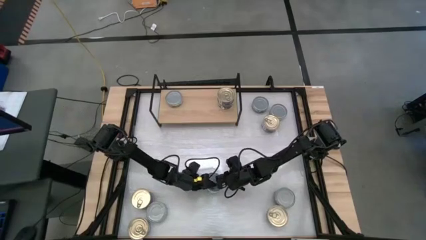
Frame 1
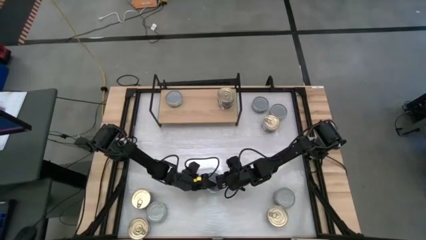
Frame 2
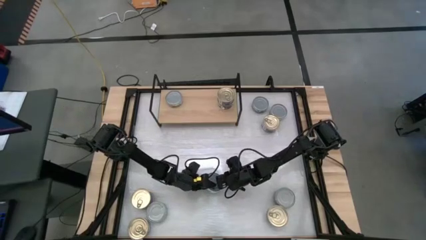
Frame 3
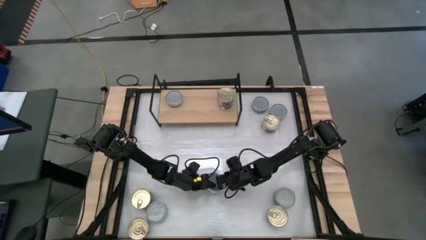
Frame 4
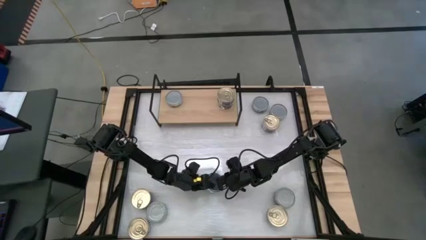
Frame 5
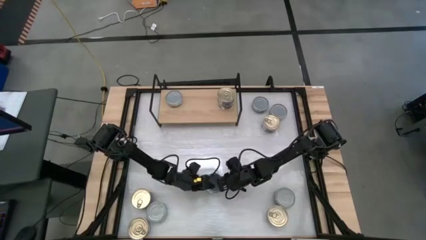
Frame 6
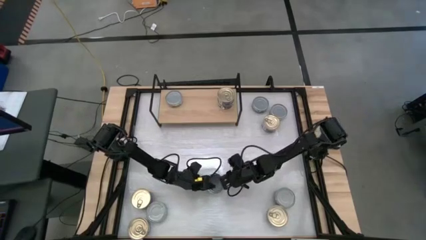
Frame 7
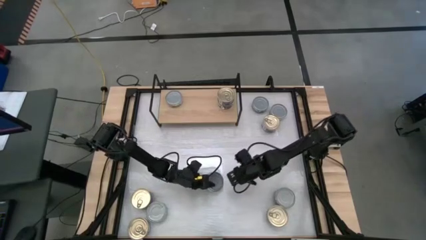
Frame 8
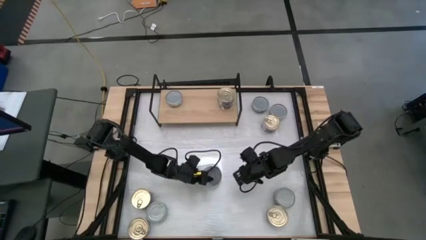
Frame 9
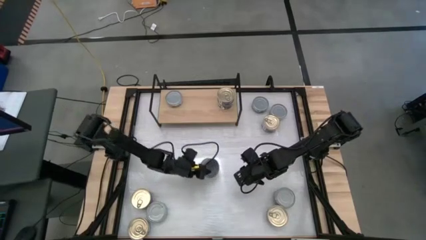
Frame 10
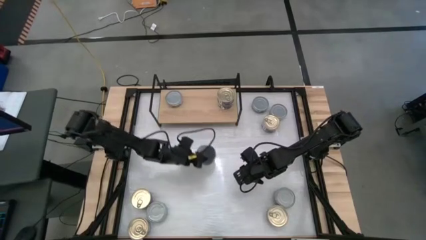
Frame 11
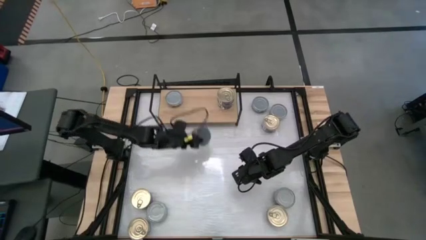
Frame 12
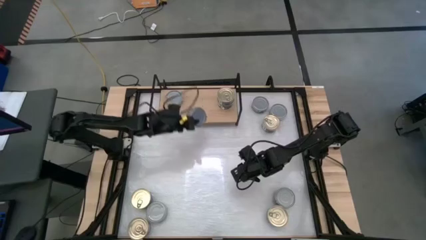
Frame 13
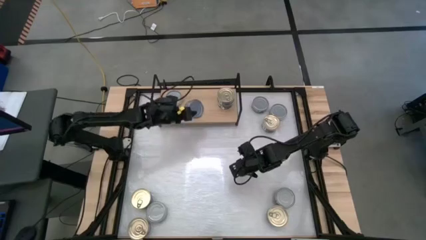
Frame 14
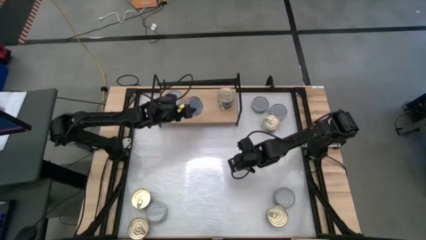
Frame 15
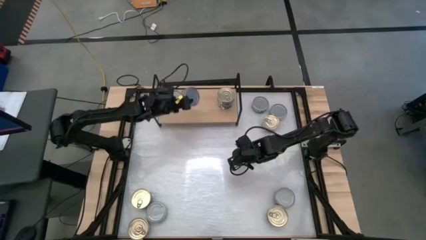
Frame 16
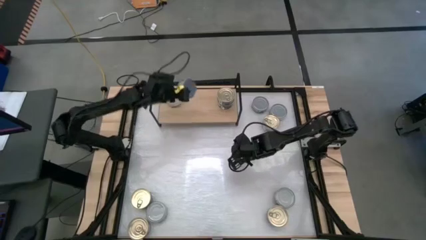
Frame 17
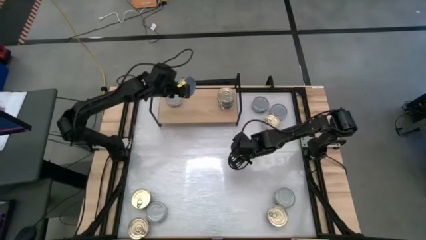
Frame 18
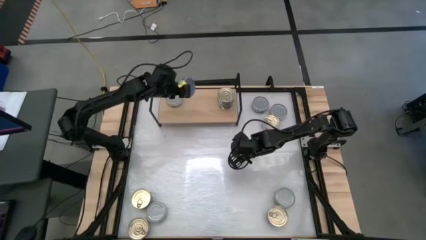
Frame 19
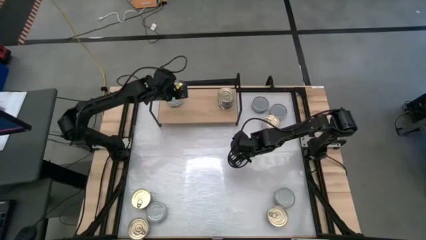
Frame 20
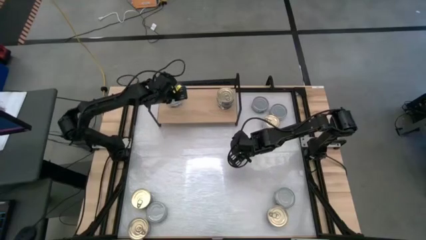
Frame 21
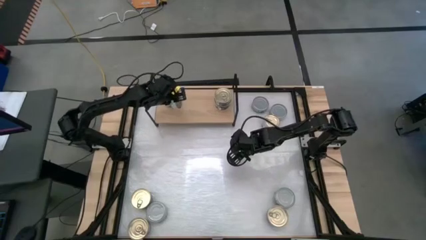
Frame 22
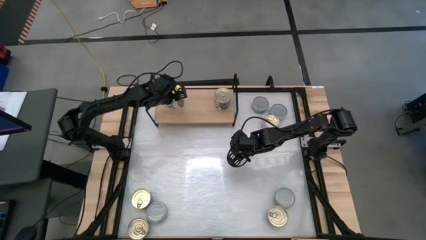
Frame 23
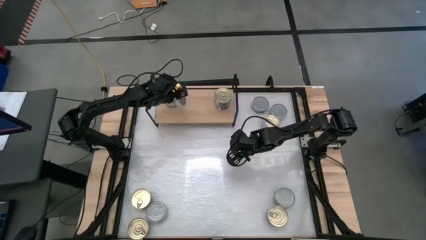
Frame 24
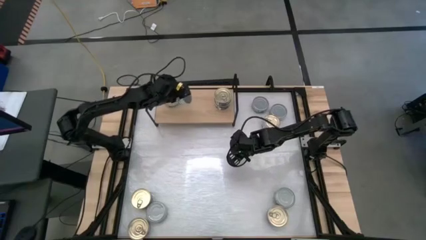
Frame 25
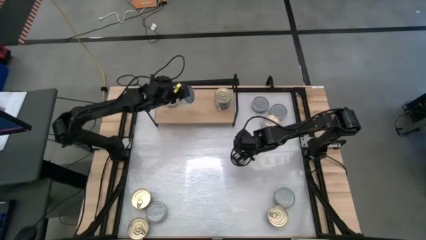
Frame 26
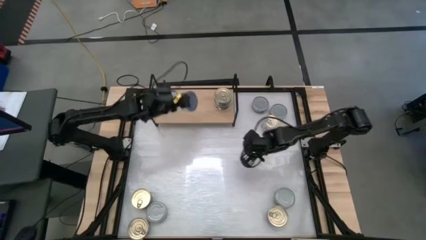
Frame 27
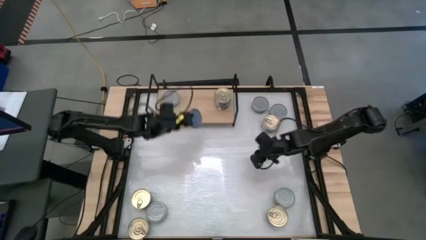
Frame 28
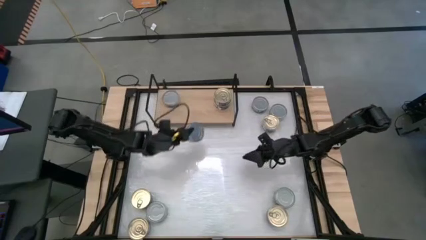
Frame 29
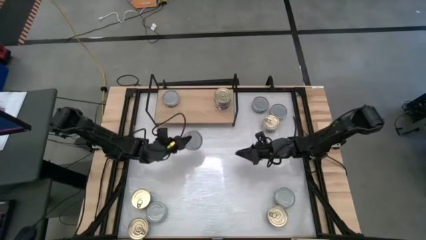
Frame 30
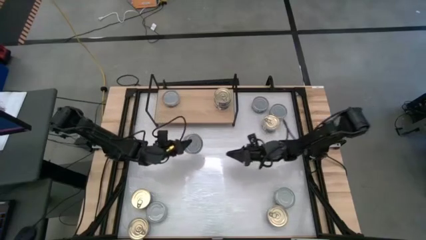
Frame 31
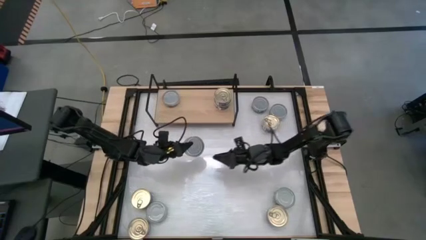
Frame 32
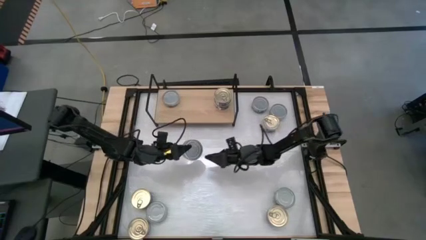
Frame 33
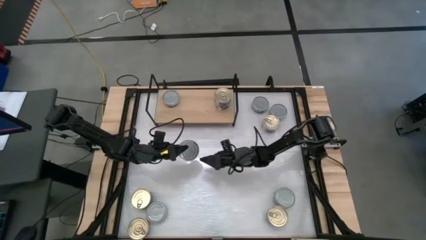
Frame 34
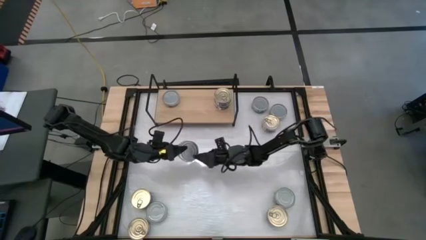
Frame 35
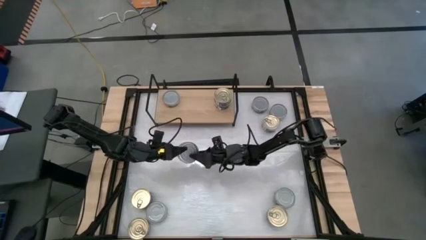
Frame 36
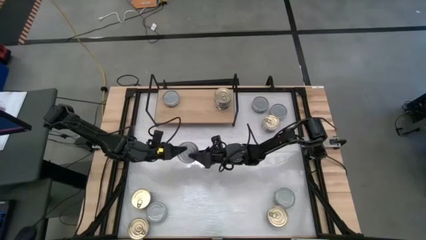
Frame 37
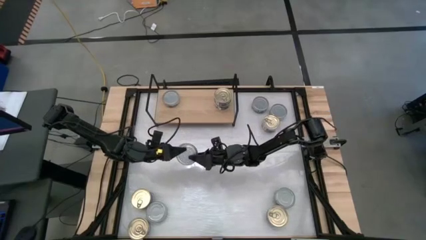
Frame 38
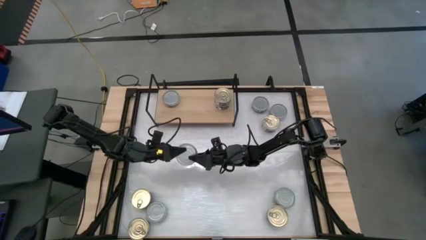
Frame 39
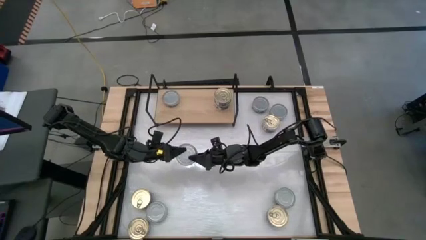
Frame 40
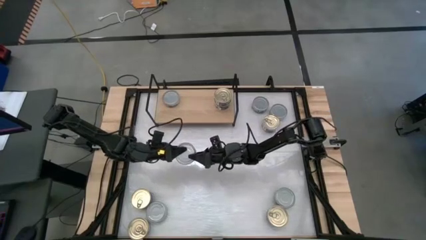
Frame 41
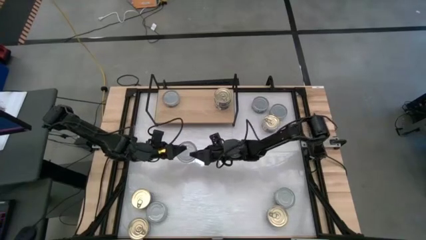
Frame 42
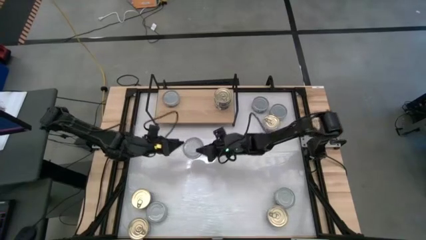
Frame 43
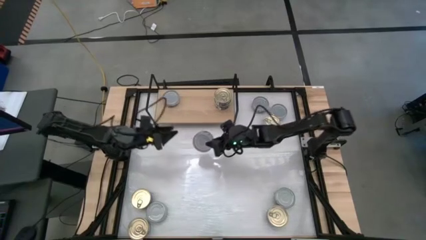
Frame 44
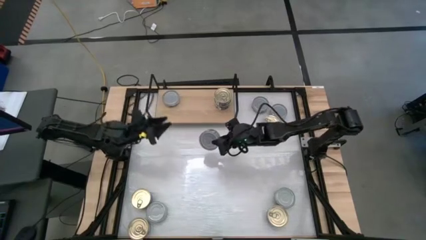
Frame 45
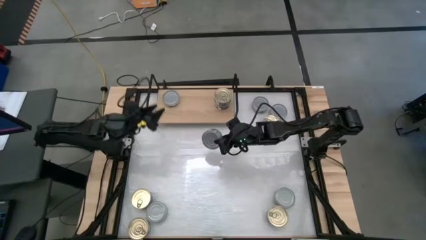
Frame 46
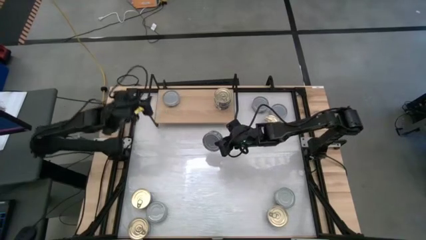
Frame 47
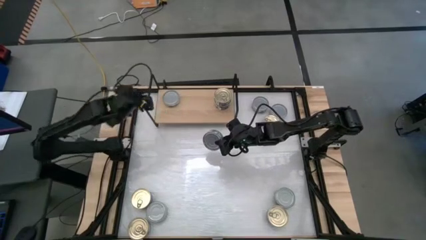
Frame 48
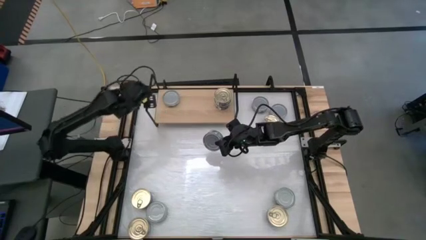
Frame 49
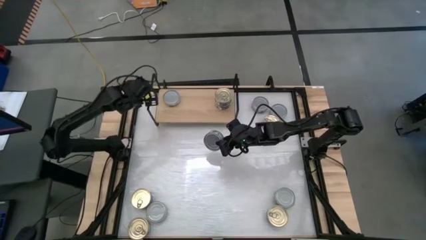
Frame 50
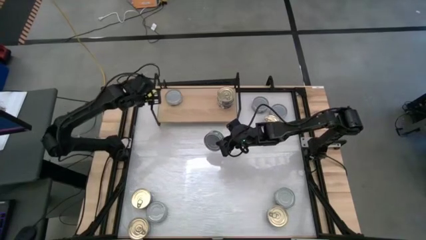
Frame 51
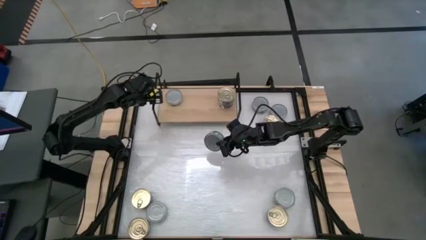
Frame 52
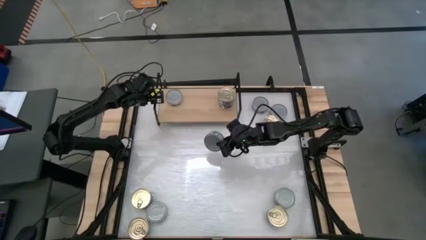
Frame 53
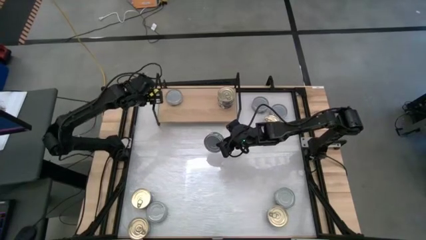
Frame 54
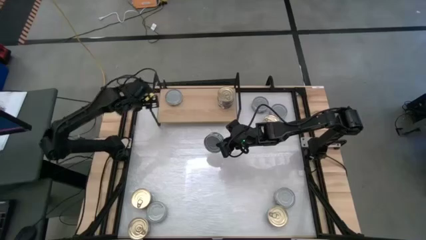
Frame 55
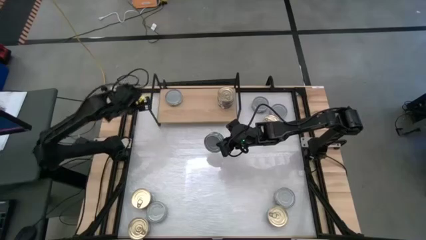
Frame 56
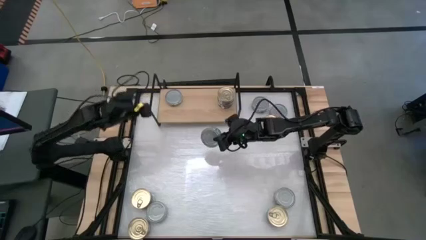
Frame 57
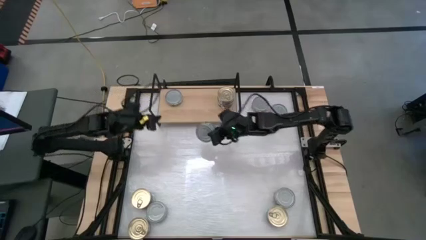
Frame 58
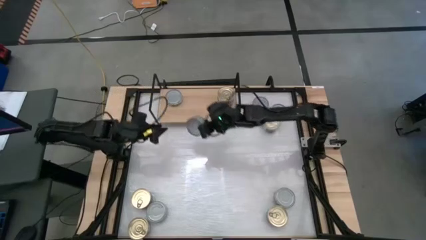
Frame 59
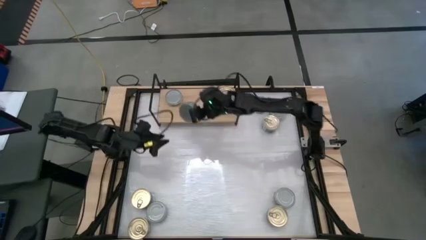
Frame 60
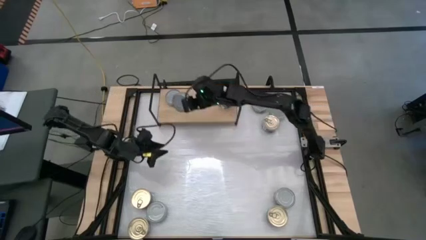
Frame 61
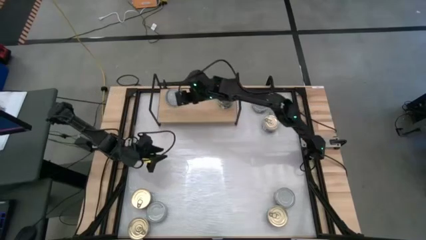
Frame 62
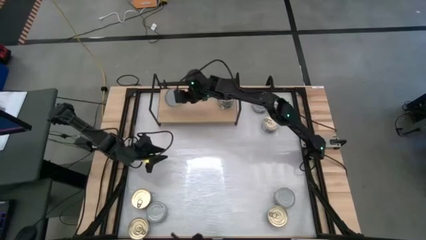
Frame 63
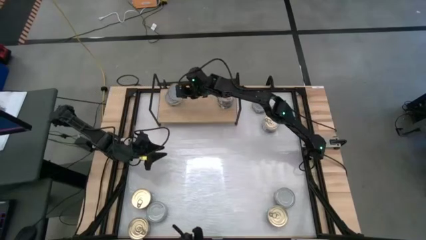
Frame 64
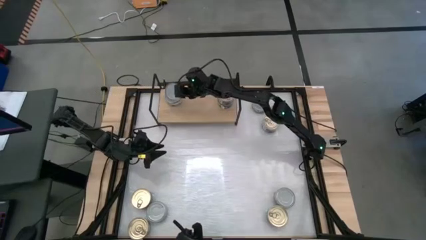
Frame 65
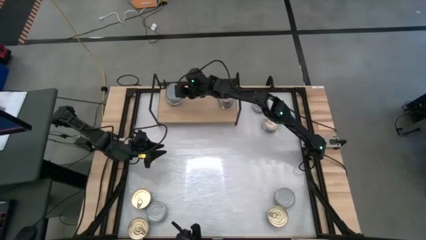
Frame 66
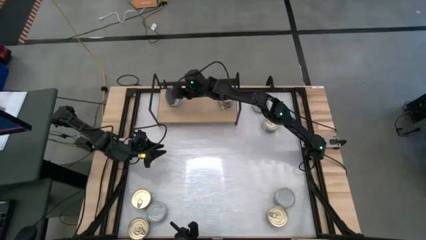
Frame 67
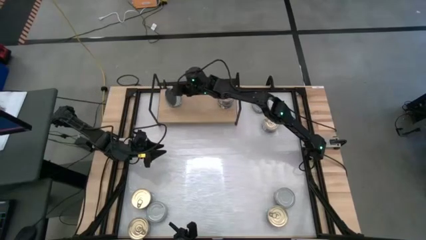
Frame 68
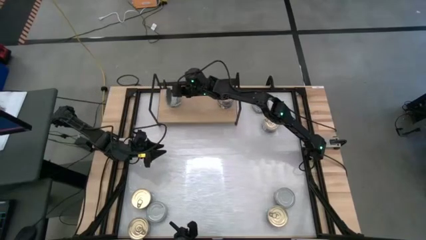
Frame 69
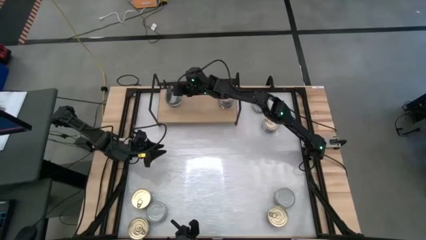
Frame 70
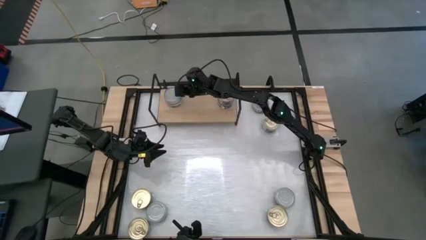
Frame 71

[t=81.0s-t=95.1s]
Task: Stack canned seafood by type on shelf
Stack the green tuna can on top of the green tuna can on the shelf

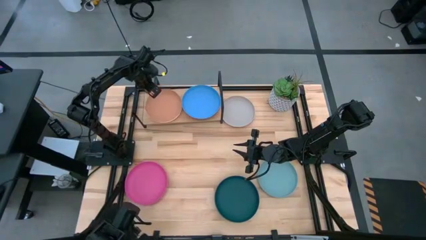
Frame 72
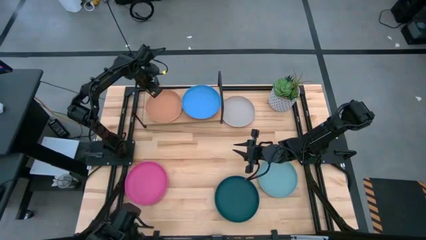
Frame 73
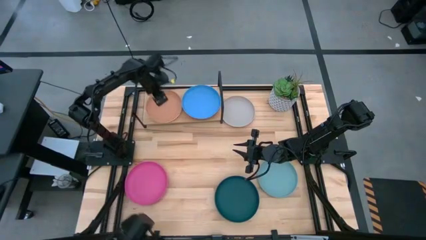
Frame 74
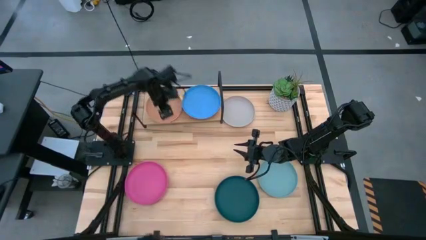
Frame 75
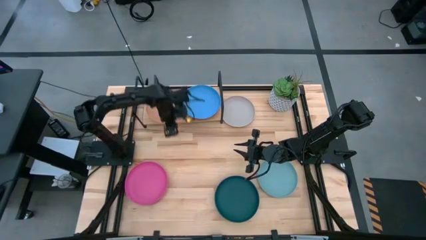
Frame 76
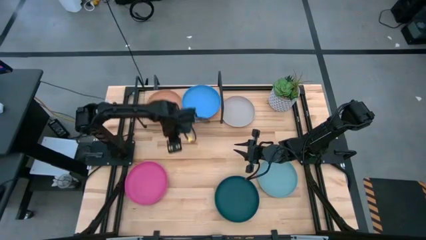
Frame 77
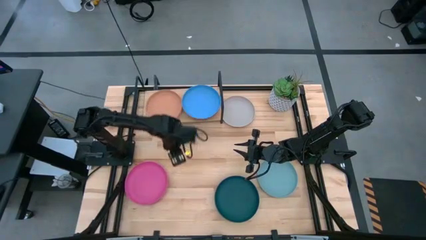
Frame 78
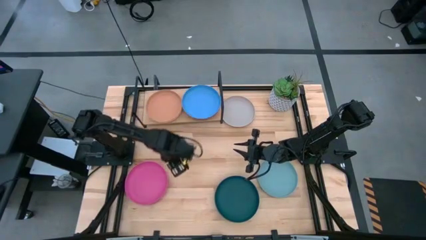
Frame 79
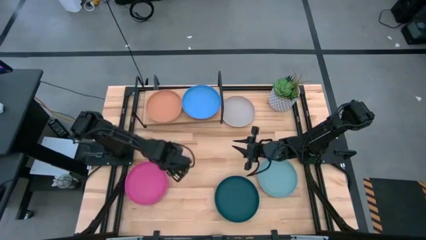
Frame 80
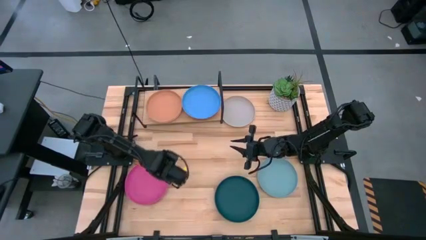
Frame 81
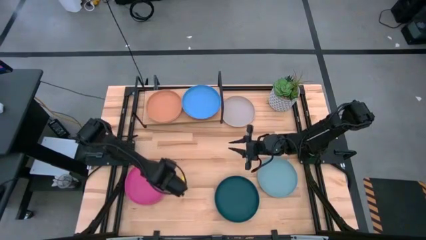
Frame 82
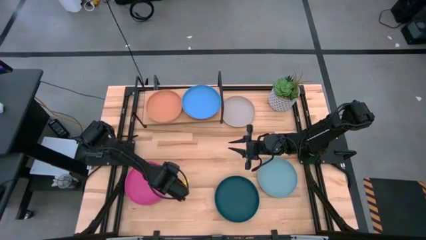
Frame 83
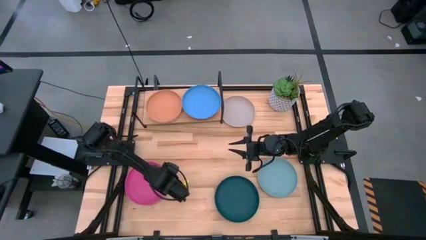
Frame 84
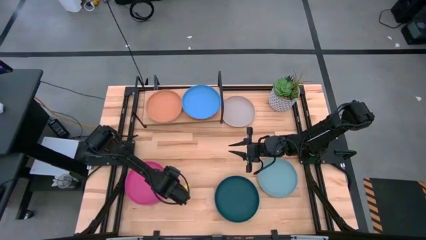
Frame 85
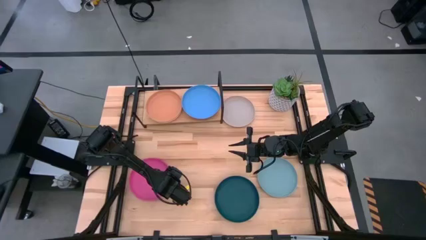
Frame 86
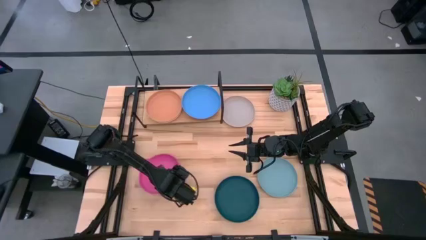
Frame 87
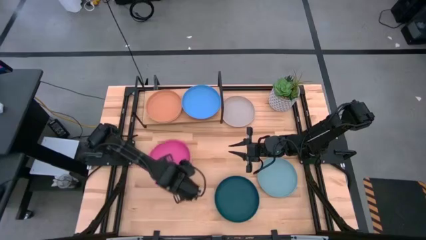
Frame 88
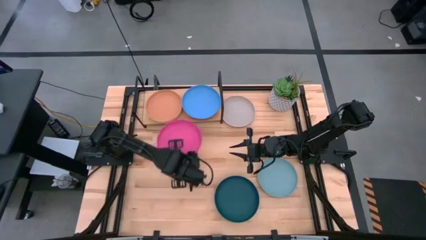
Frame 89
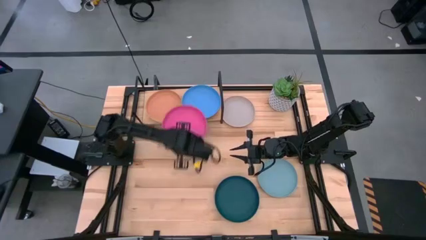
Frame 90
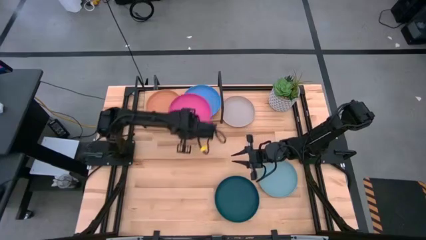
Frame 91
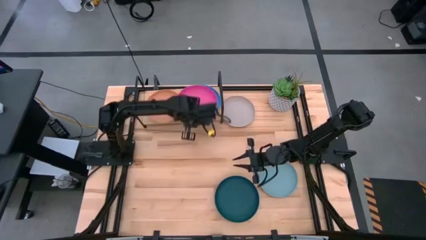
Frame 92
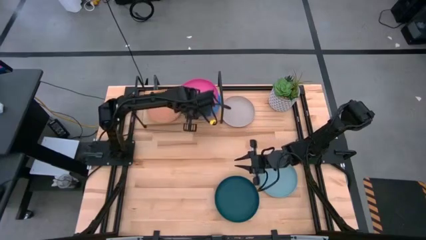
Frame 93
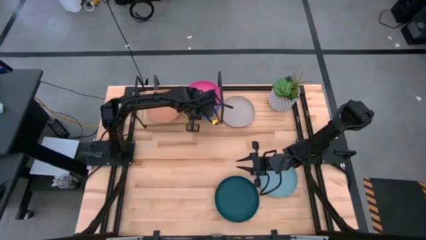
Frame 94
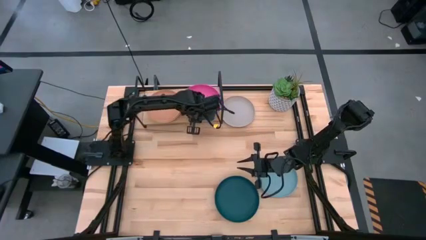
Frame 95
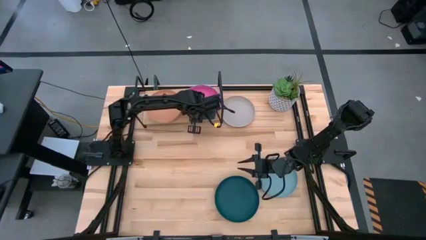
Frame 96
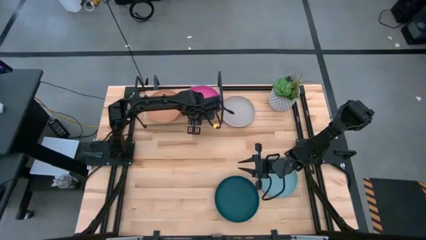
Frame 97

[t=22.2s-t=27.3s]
Task: Place and stack plates onto a shelf
Stack the purple plate on top of the brown plate
